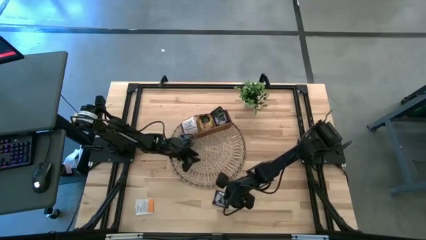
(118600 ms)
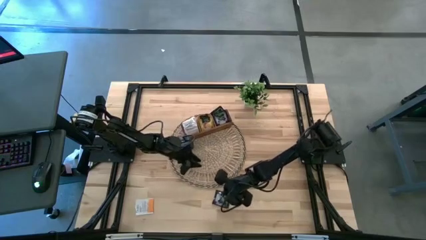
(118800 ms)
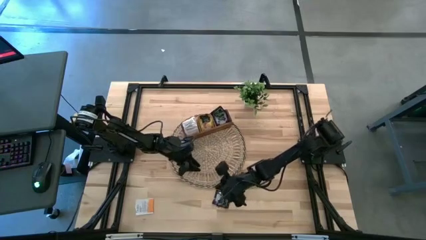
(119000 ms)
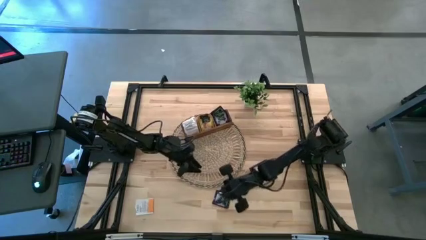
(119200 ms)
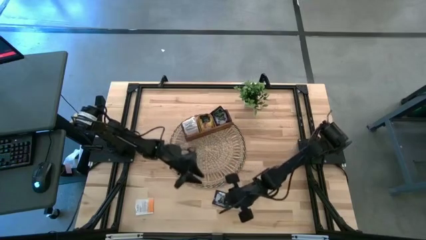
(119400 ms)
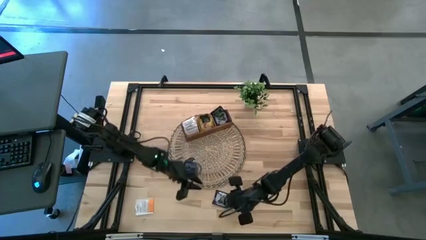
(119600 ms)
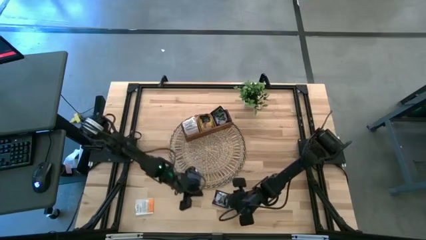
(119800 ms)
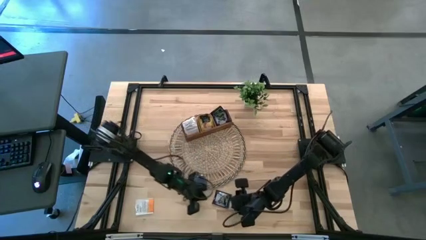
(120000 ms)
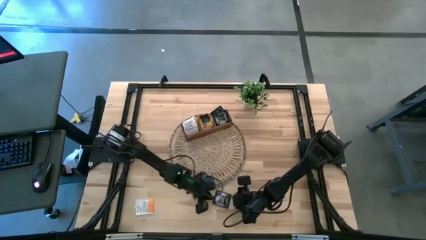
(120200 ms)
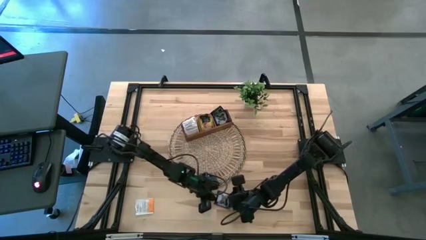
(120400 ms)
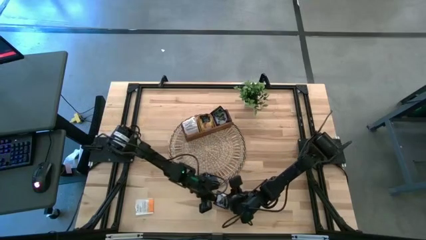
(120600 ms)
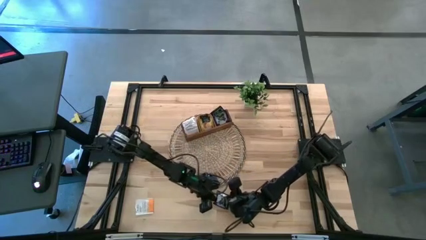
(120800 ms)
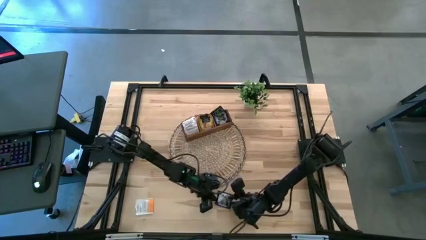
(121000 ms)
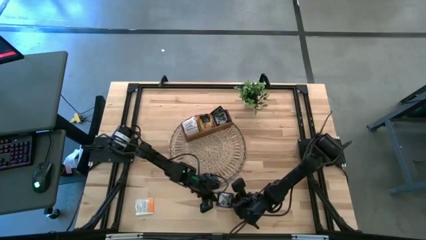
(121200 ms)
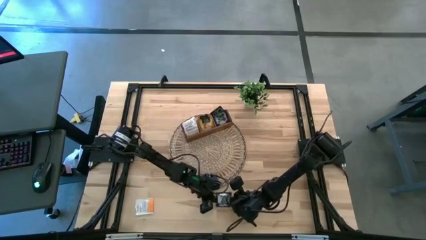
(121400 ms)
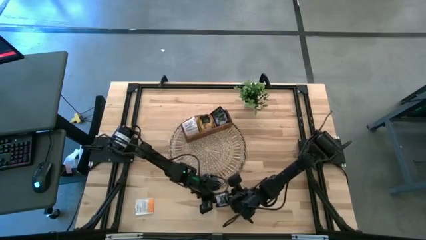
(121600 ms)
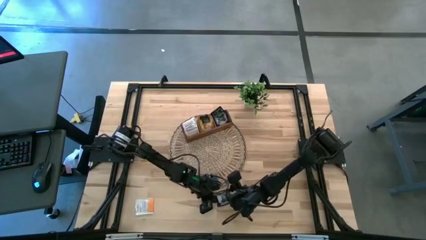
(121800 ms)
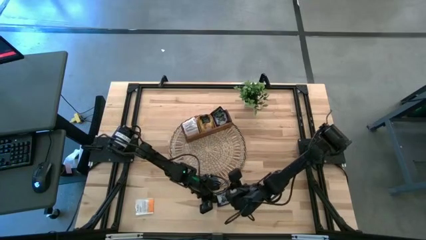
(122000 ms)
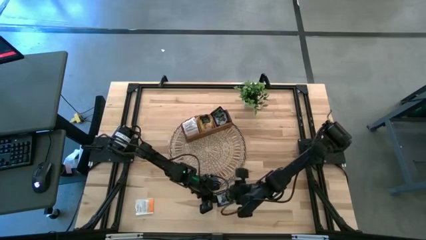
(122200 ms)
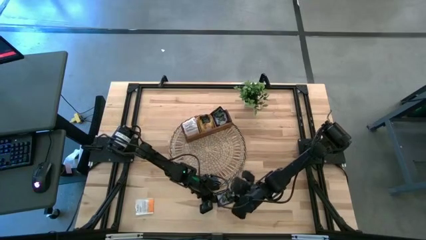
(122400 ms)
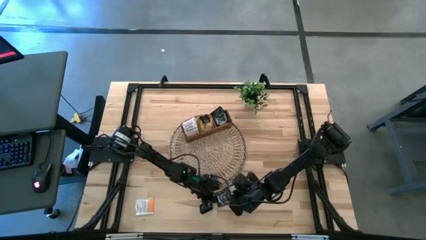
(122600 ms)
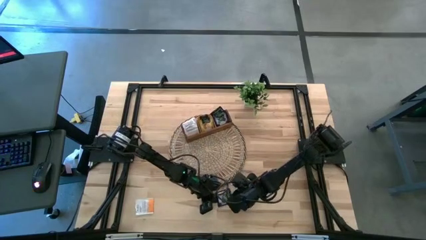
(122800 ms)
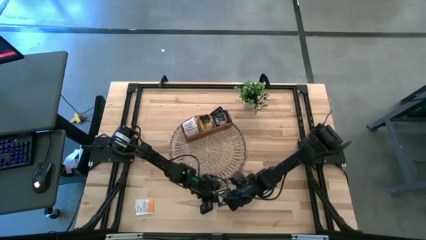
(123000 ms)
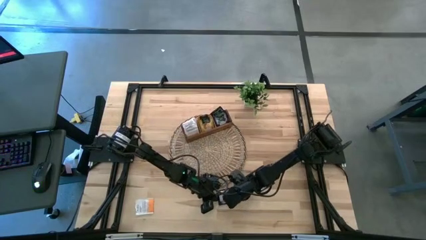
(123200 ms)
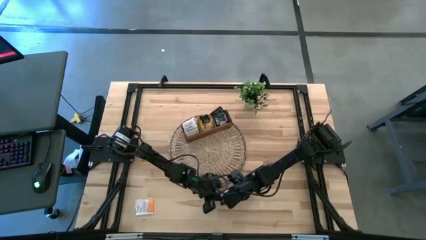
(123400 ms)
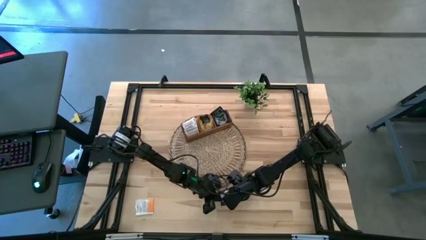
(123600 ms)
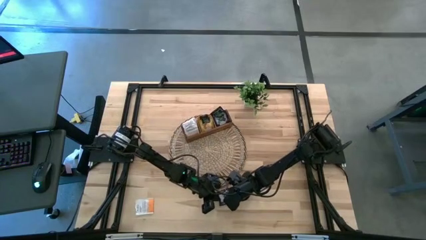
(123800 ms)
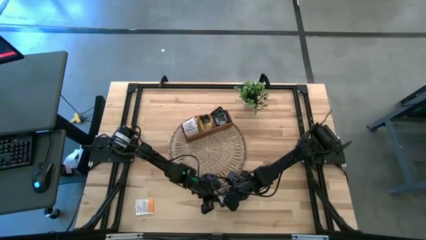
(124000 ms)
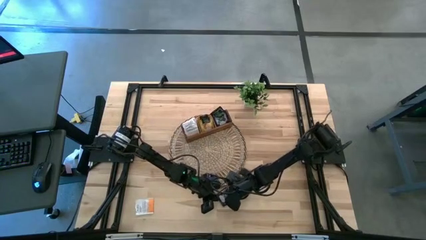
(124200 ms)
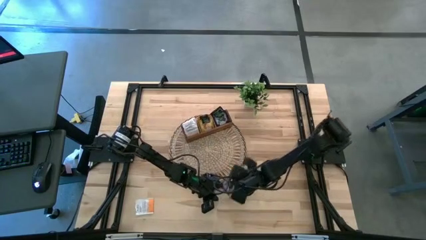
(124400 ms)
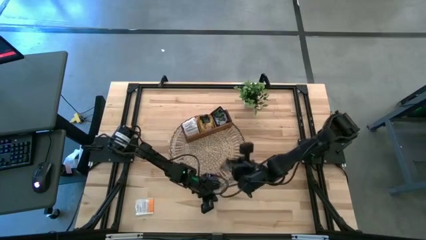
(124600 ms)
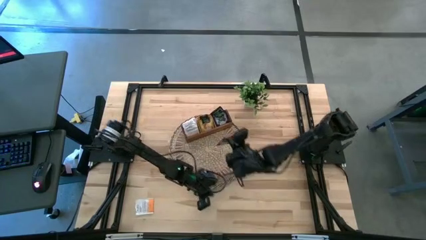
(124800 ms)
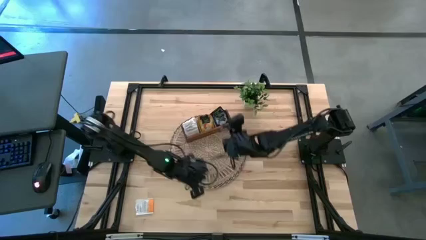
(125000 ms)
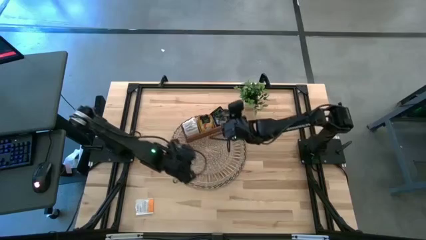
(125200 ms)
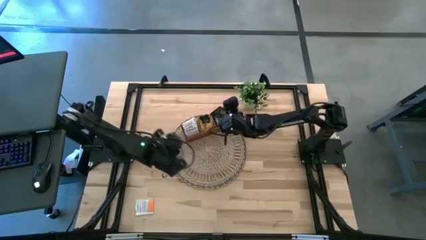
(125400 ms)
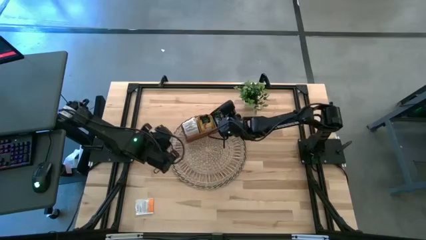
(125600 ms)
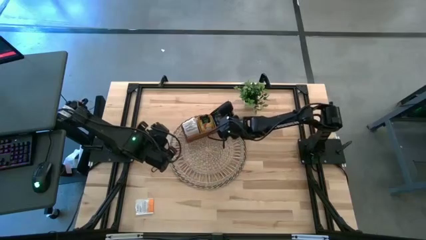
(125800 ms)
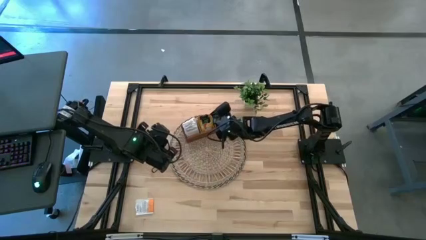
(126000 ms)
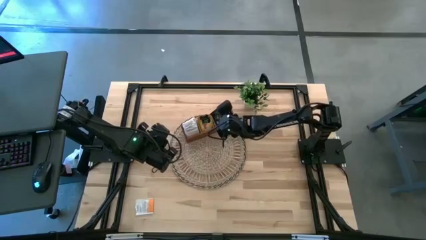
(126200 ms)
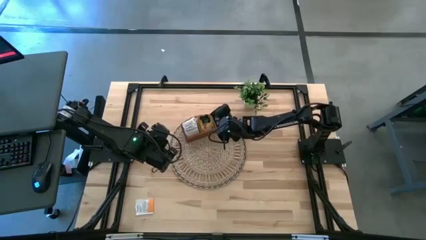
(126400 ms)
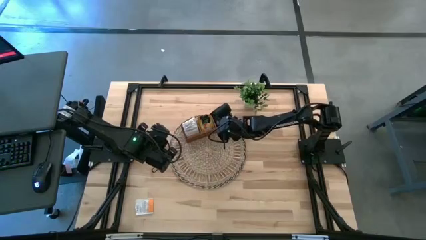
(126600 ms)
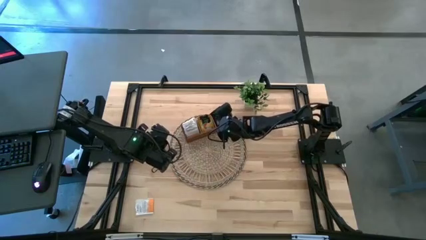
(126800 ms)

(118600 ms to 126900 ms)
Task: Pick & Place Tea
Put the violet tea packet into the right compartment of the wooden organizer

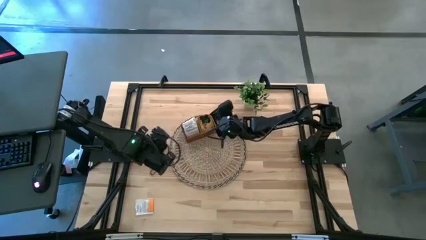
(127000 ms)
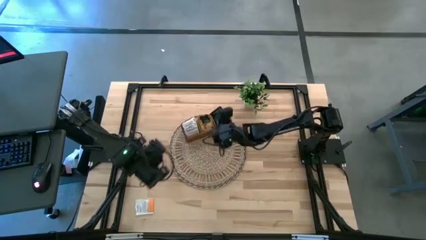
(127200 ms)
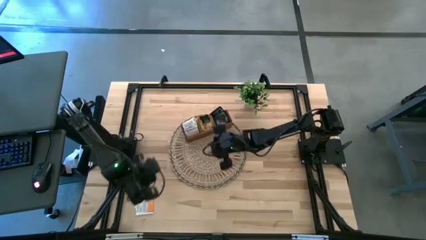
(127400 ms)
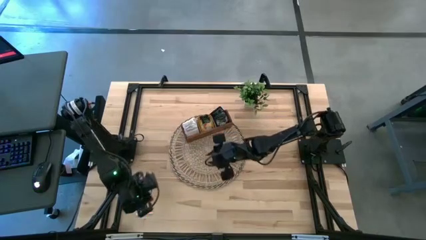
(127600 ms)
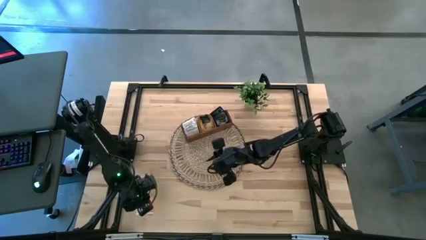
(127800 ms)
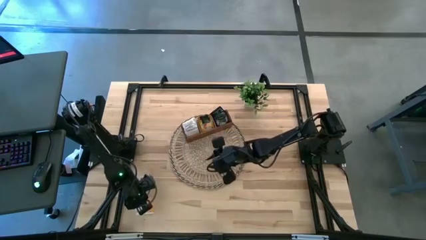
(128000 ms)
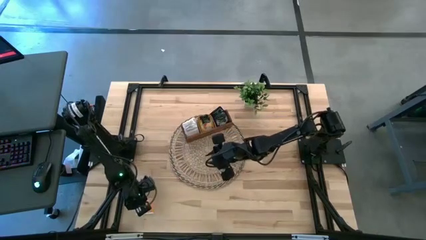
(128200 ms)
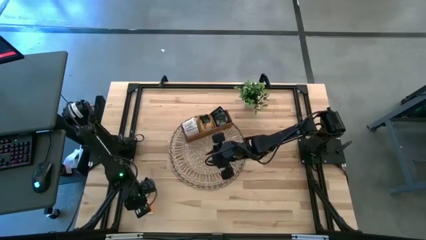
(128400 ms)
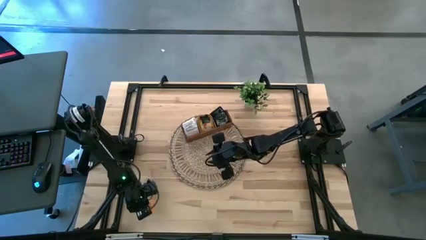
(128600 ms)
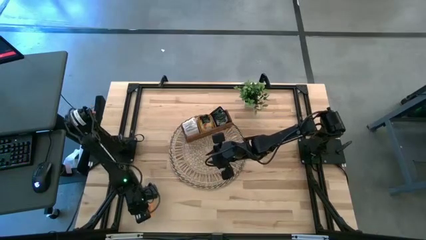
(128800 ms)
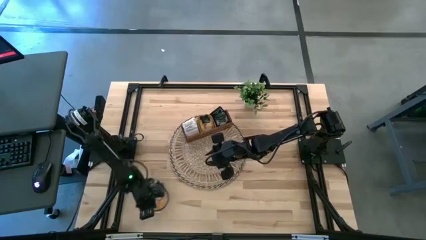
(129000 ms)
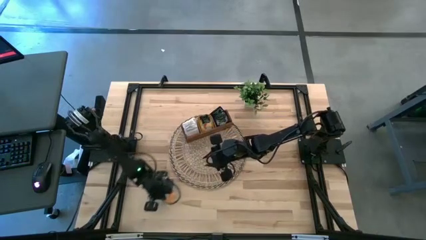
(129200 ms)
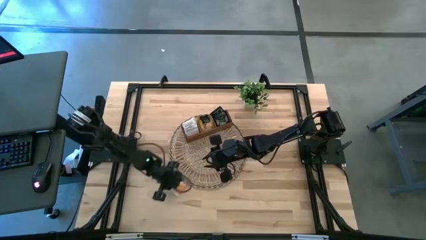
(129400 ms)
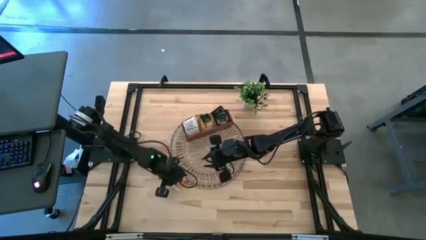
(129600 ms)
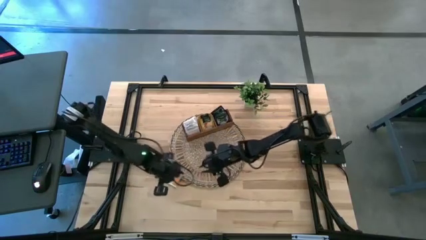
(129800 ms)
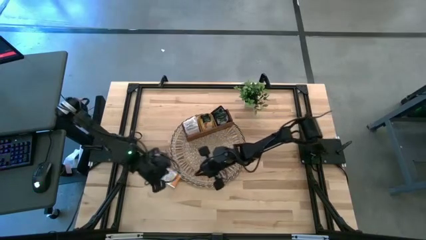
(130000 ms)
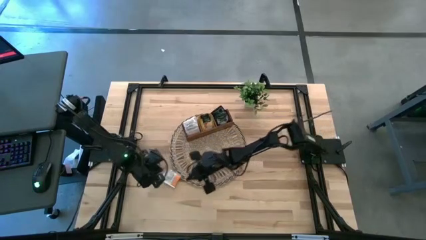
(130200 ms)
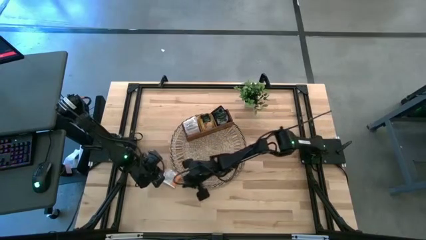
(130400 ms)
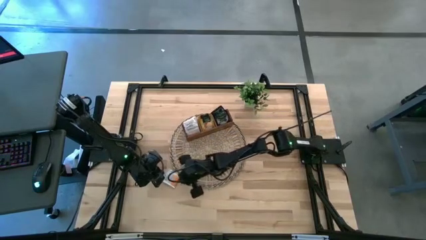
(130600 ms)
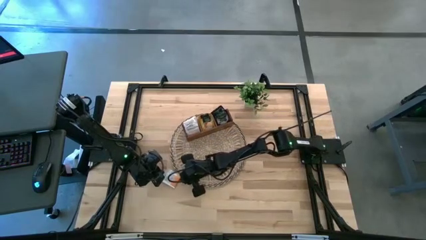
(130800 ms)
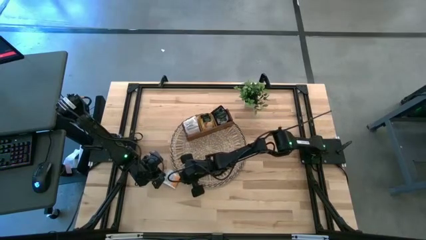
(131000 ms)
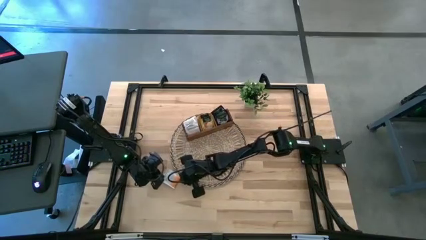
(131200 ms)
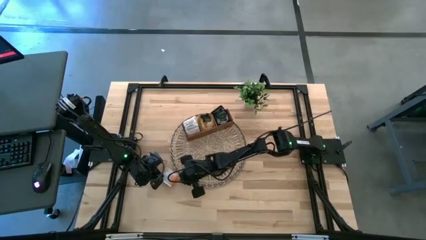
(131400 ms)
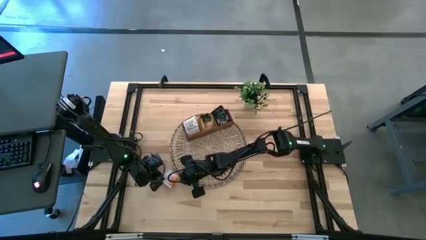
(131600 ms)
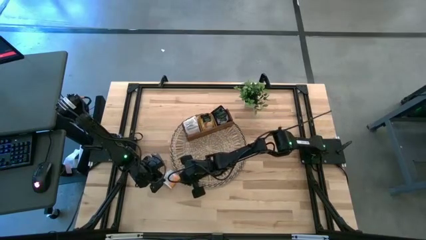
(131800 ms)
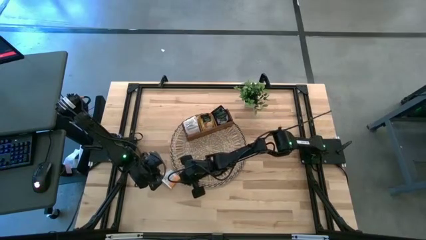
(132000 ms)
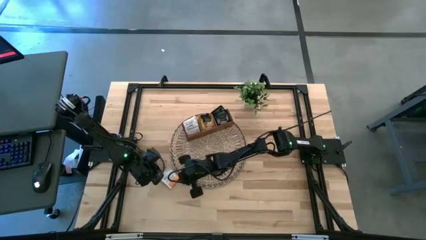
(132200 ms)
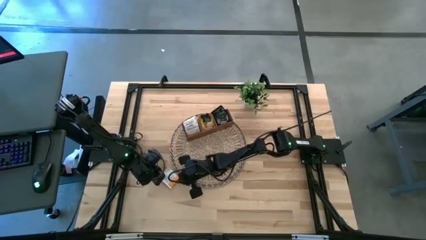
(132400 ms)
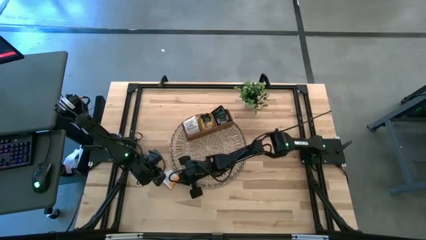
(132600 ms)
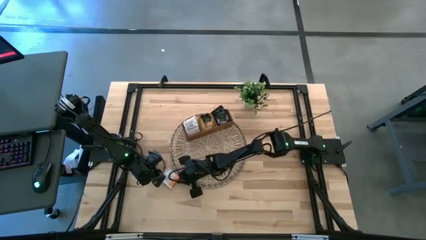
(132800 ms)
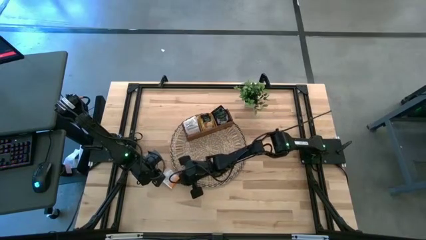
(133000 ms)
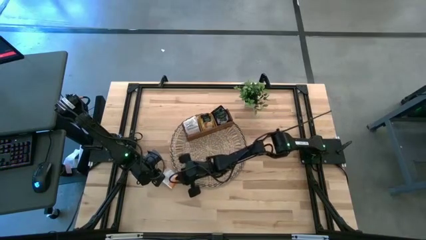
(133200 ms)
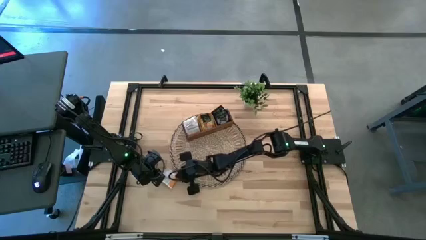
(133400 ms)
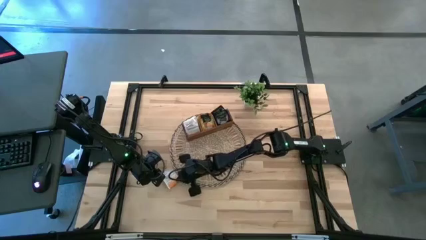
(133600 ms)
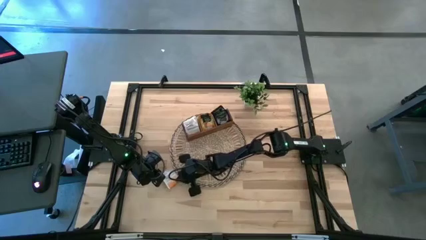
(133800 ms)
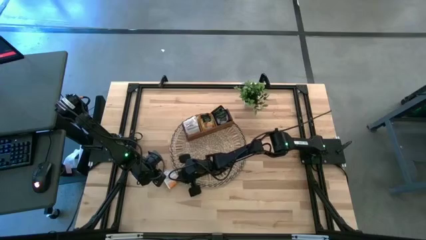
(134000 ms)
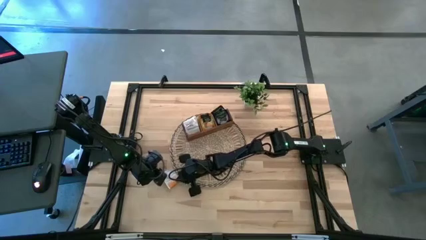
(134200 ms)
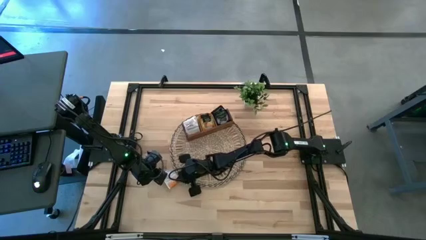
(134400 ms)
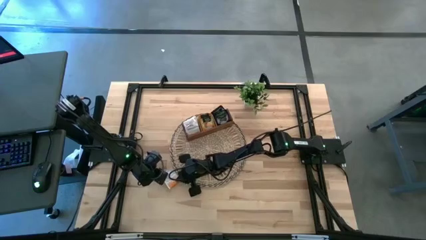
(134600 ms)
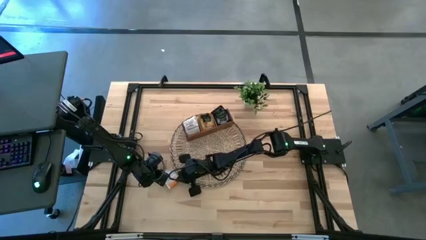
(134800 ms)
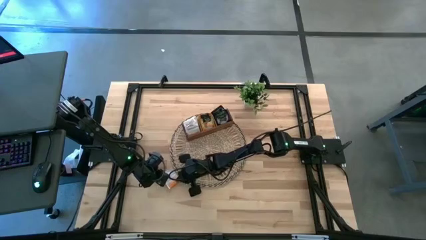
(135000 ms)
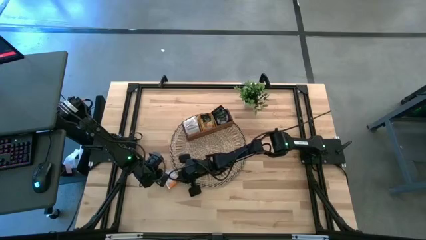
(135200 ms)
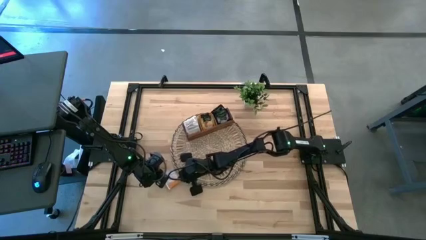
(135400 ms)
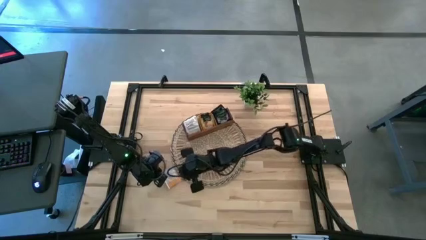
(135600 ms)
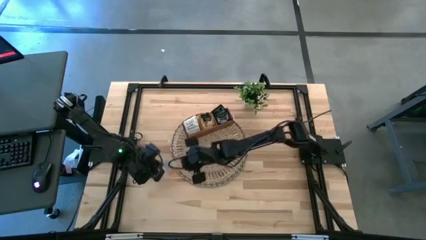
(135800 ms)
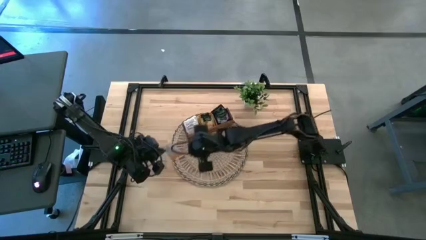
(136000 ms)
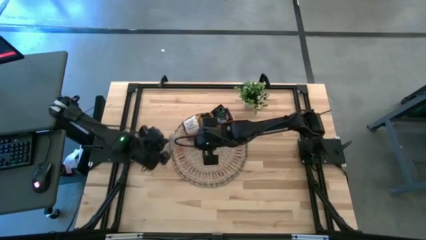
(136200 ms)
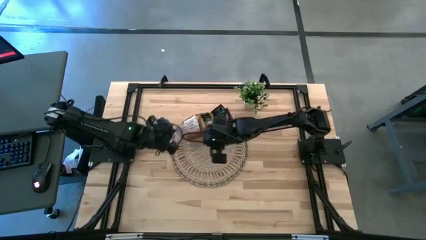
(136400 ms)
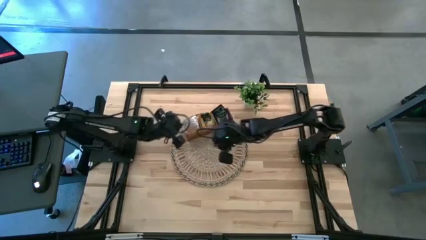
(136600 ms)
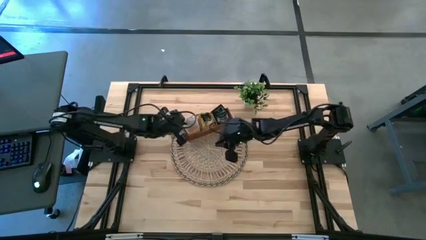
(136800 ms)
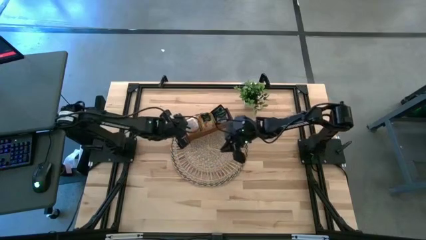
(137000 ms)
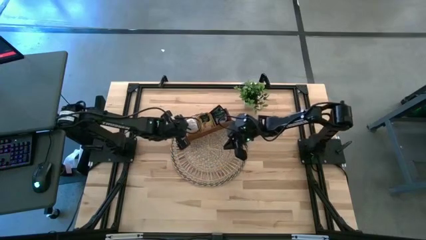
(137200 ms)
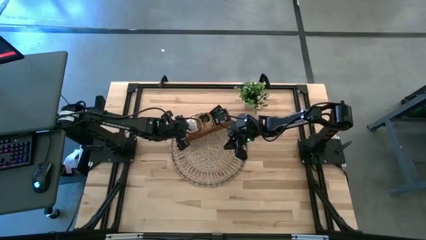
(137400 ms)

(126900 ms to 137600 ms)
Put the white tea packet into the left compartment of the wooden organizer
